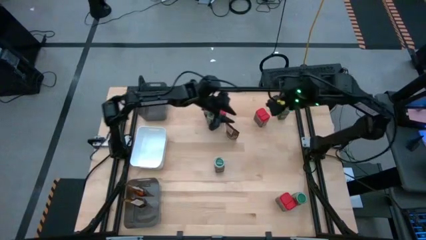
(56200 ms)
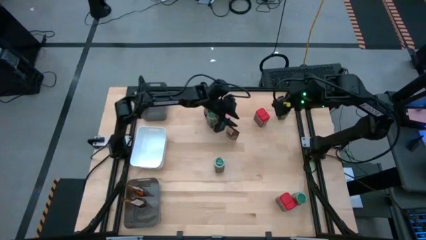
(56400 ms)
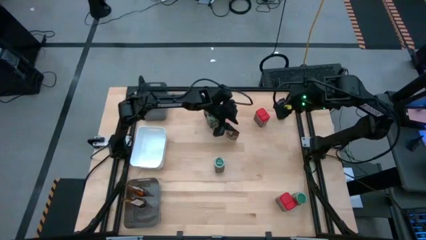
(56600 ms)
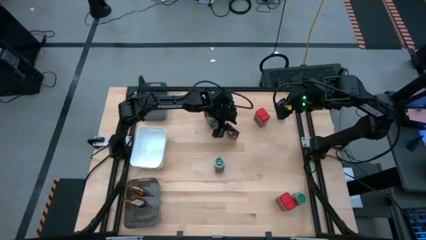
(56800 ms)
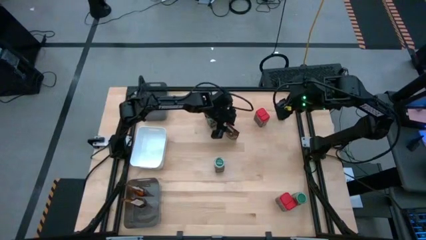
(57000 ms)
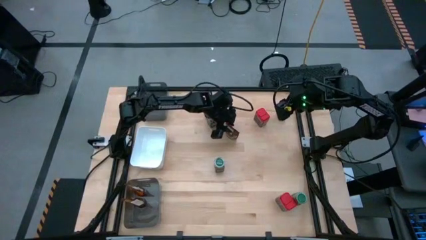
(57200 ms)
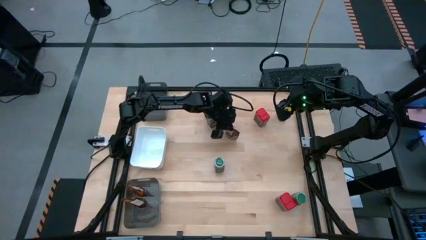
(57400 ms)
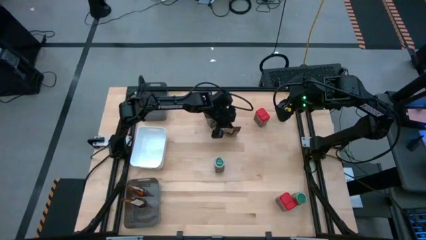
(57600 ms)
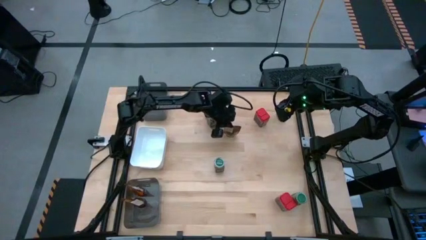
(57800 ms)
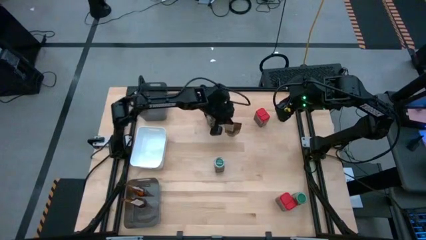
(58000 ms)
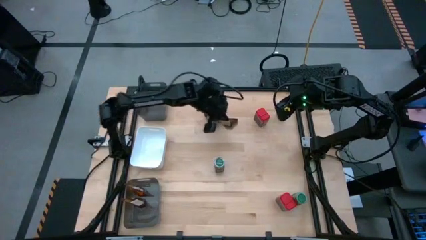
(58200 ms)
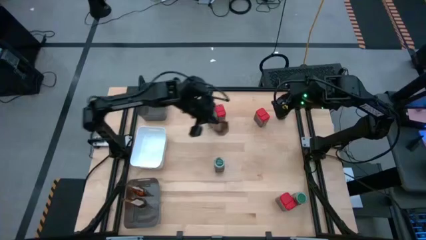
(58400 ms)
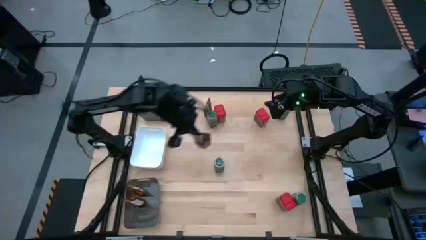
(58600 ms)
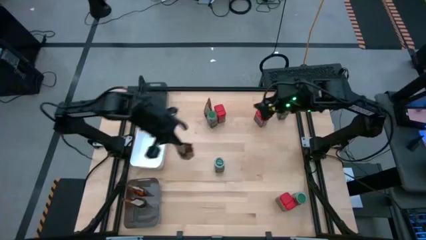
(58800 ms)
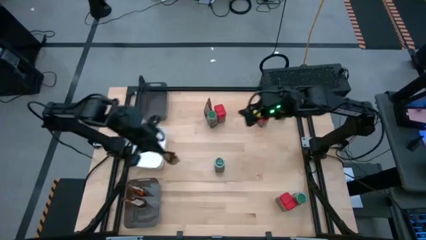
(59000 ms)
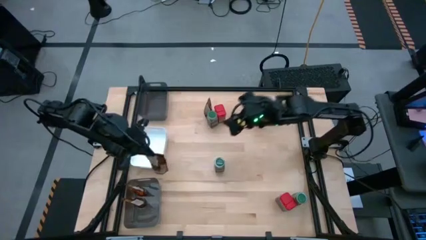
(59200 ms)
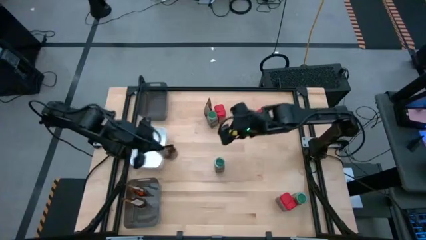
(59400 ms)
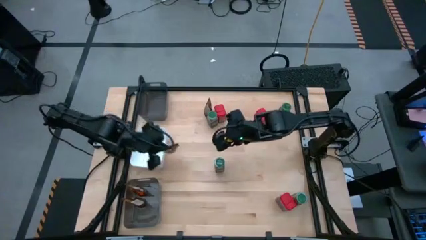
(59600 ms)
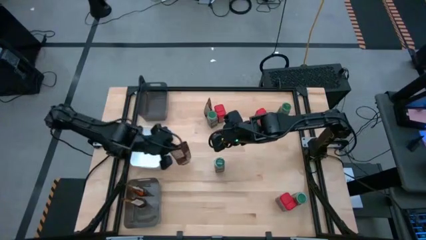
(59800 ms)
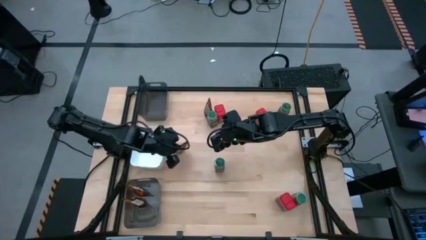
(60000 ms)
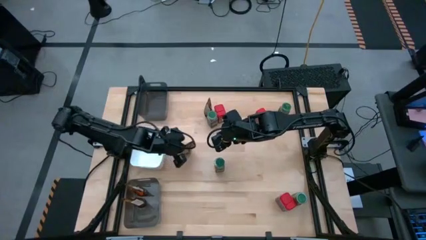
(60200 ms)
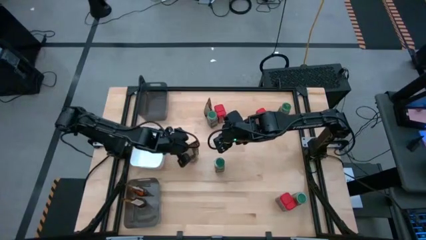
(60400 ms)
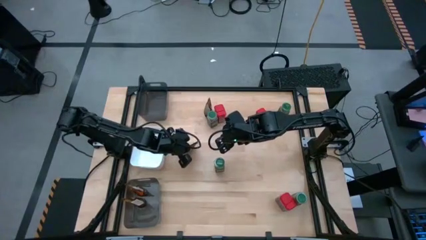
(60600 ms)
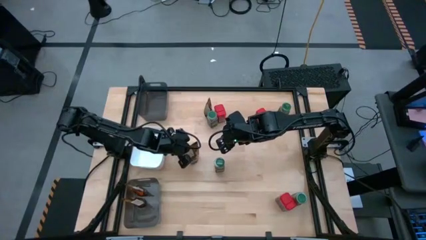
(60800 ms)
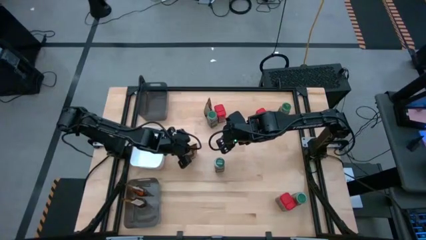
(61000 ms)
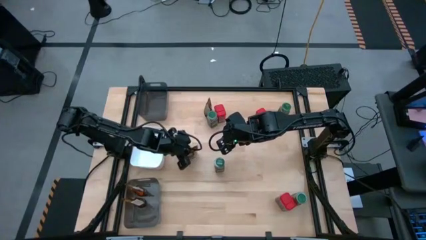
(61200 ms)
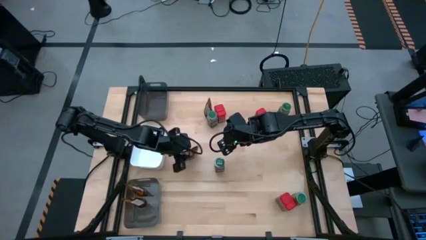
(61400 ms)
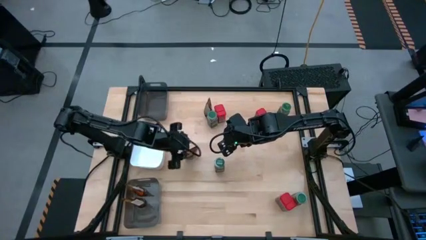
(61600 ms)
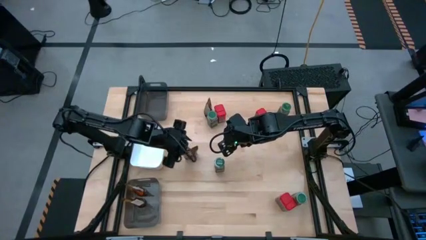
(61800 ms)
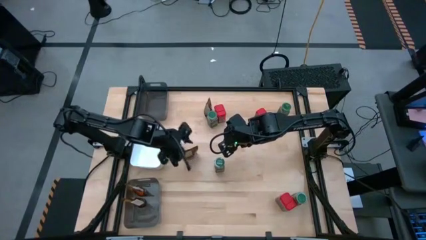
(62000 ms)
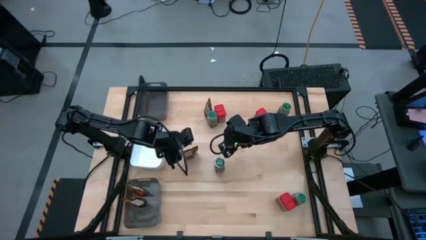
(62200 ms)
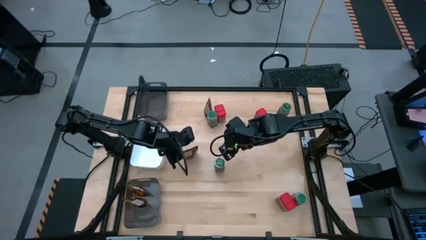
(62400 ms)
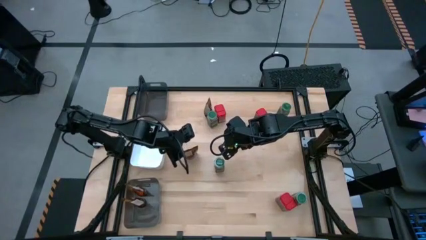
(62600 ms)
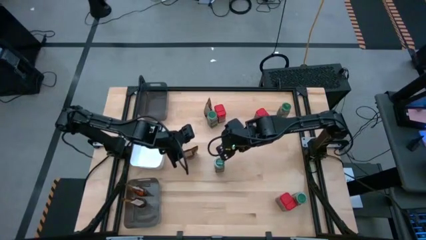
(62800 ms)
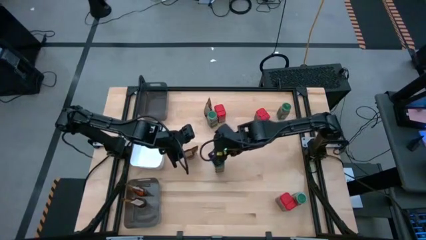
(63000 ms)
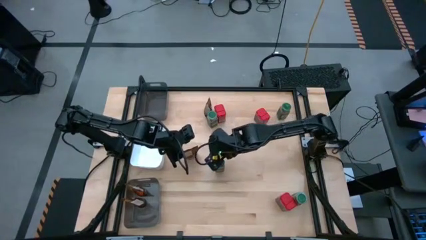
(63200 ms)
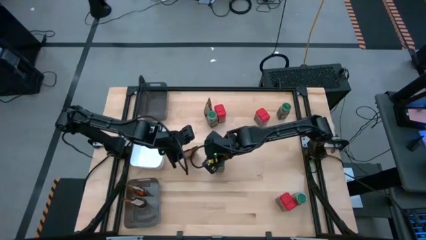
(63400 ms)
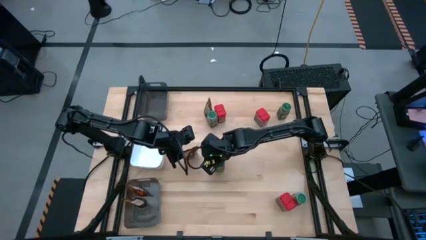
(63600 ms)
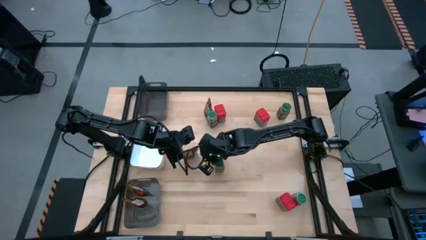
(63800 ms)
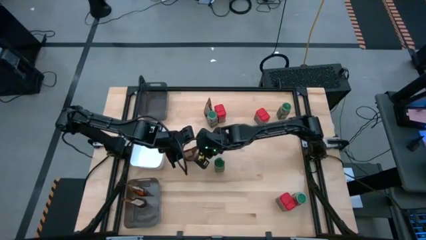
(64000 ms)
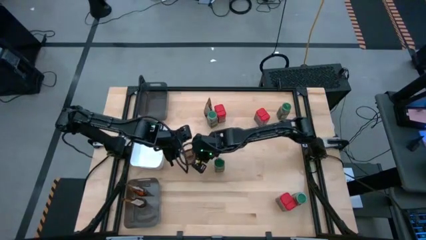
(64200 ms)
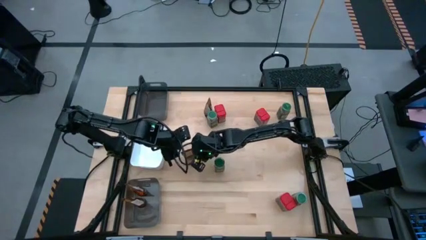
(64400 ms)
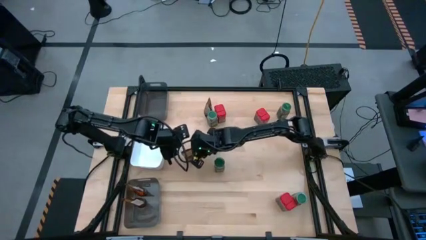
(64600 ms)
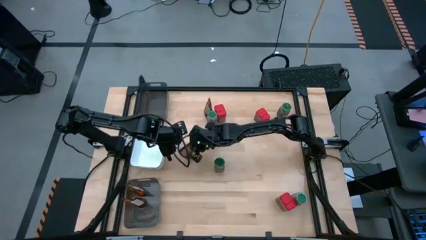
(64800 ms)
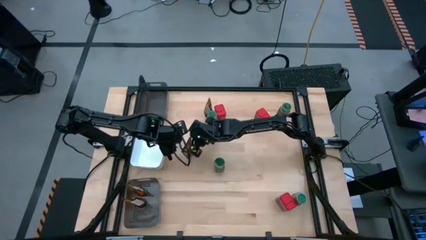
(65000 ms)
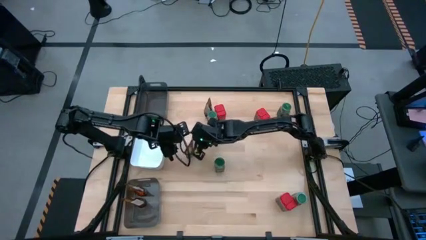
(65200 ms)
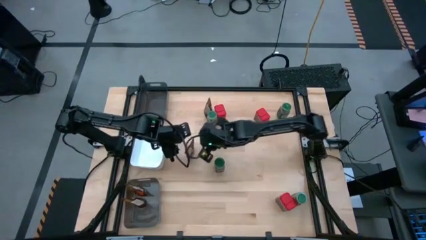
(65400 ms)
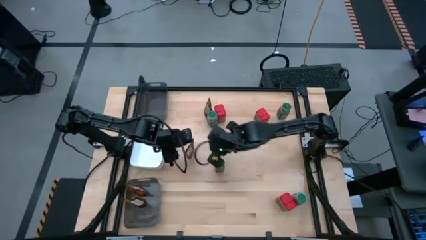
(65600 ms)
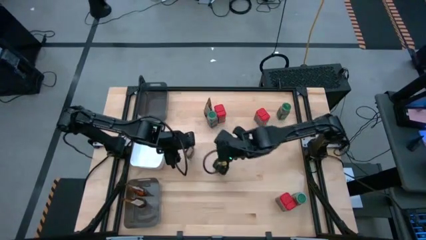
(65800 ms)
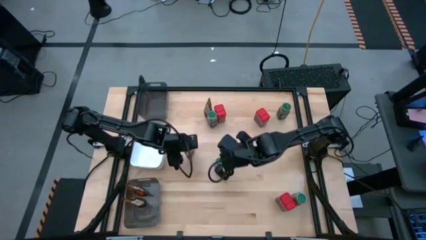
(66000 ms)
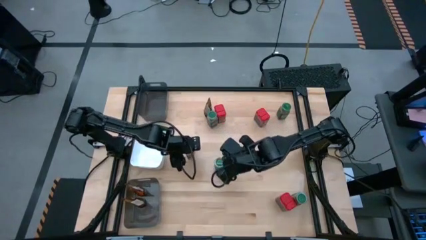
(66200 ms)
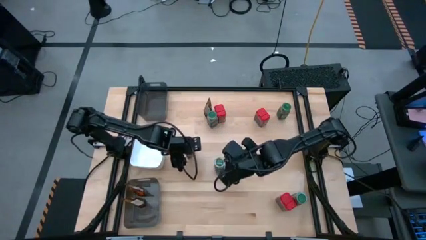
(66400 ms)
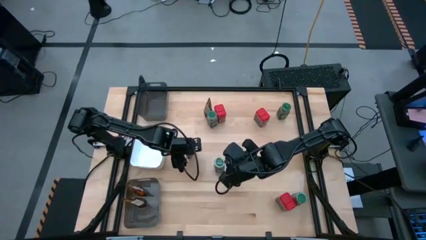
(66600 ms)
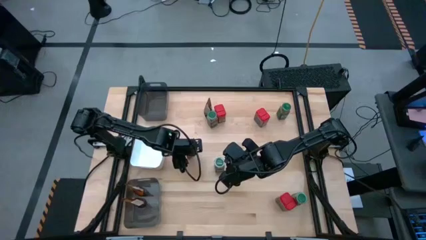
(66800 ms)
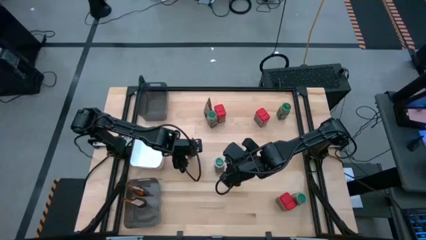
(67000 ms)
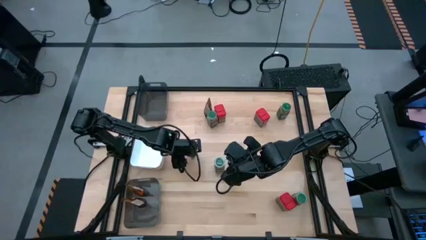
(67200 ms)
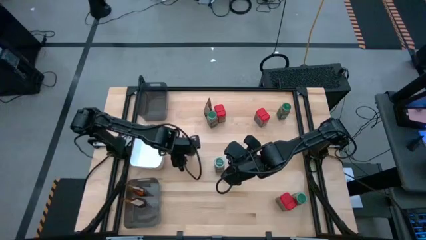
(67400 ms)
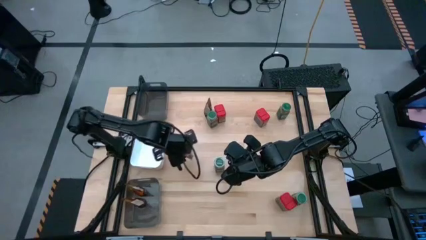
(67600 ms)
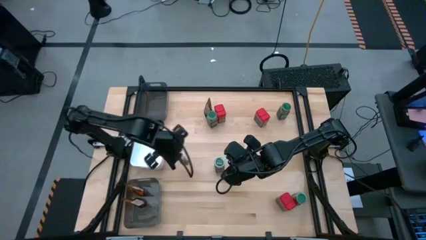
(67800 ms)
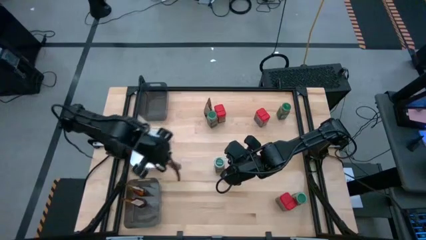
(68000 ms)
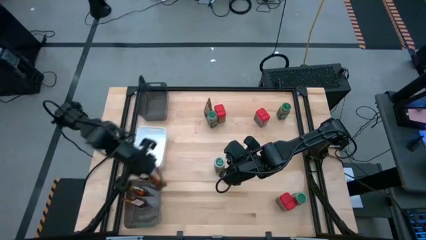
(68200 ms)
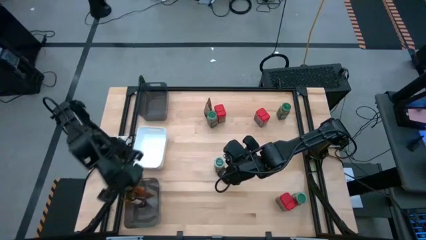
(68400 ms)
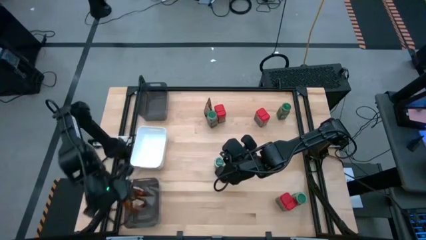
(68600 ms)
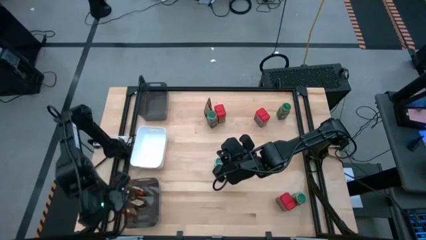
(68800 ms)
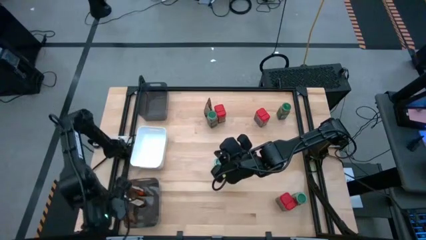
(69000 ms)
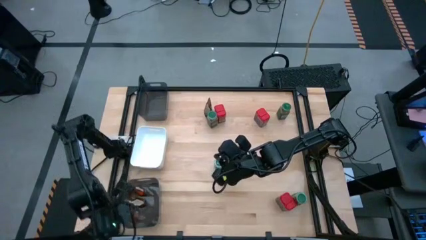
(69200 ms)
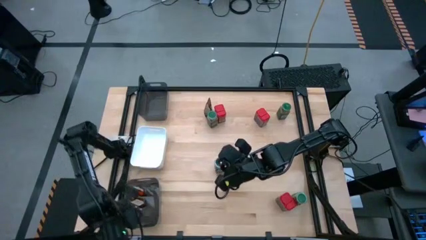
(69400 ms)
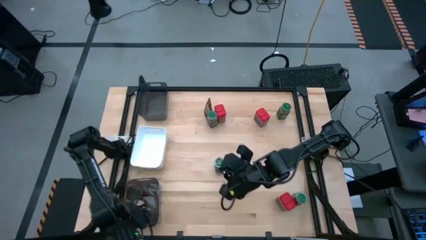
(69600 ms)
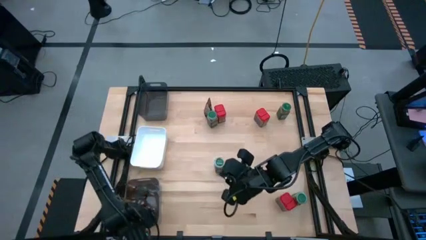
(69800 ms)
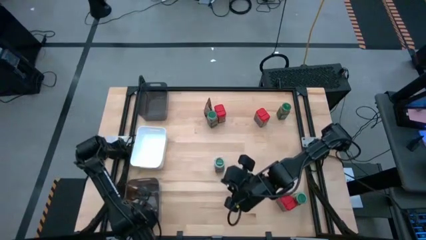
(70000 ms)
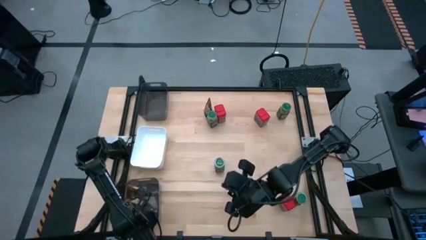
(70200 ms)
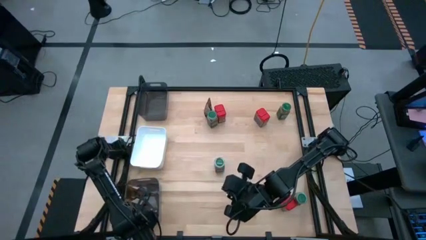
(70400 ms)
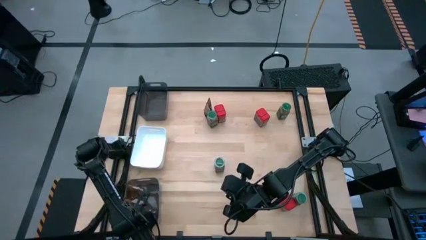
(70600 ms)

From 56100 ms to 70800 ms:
Task: Sort spices by type
Put the orange seasoning bag into the bottom black bin

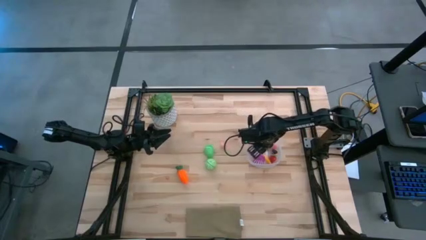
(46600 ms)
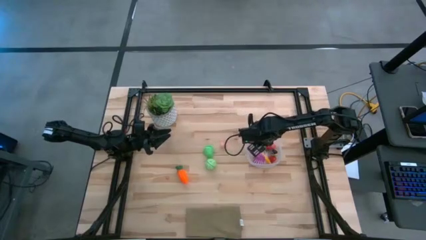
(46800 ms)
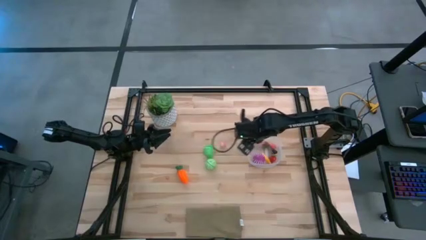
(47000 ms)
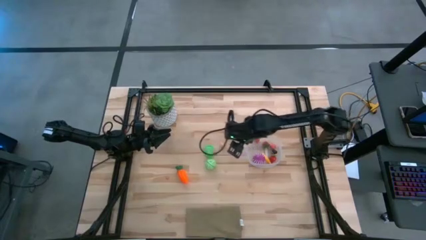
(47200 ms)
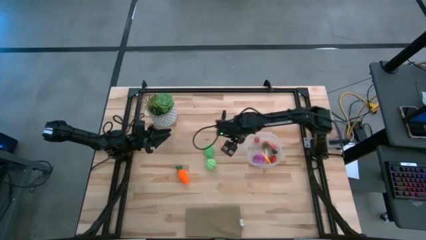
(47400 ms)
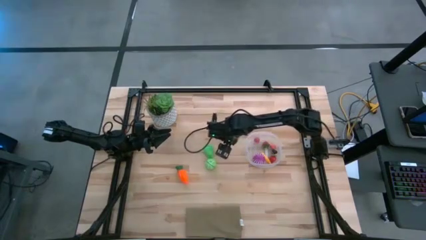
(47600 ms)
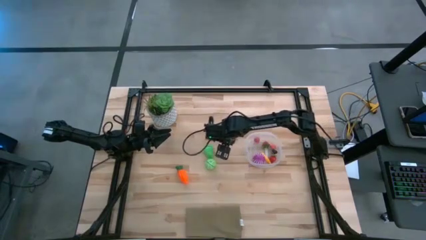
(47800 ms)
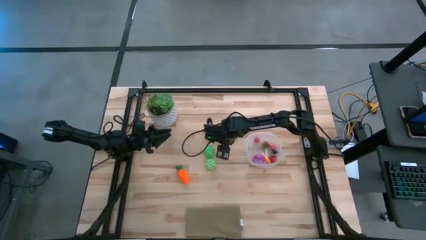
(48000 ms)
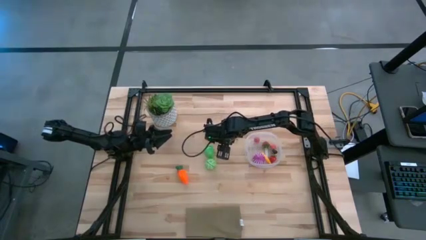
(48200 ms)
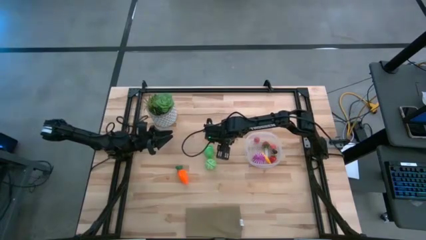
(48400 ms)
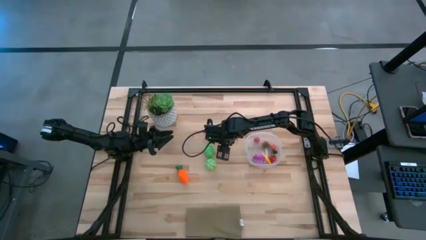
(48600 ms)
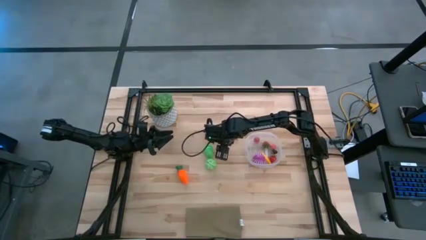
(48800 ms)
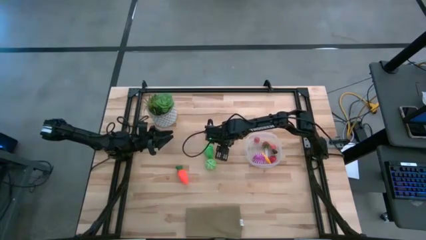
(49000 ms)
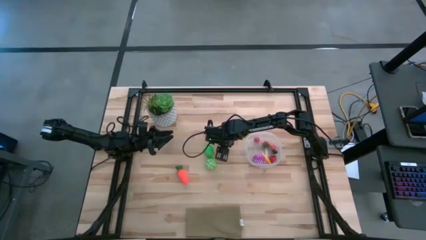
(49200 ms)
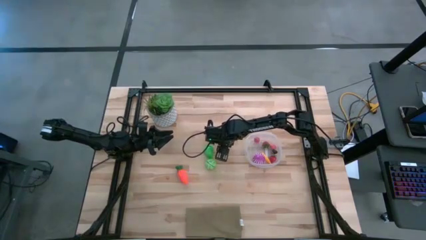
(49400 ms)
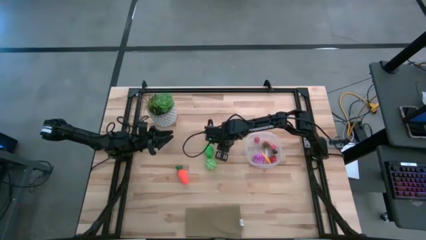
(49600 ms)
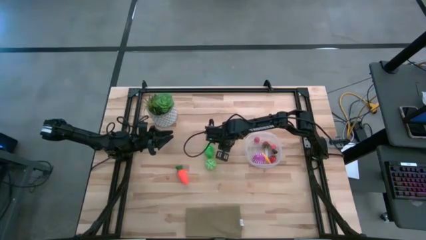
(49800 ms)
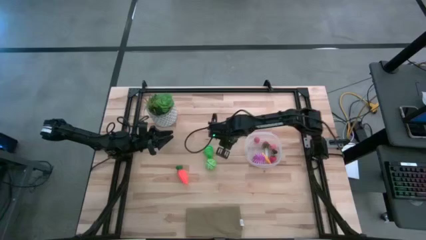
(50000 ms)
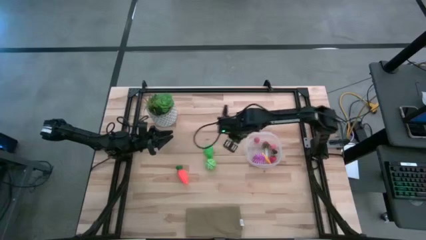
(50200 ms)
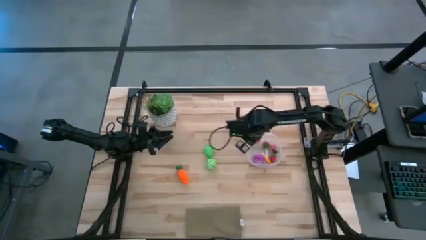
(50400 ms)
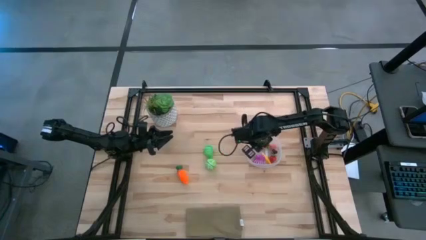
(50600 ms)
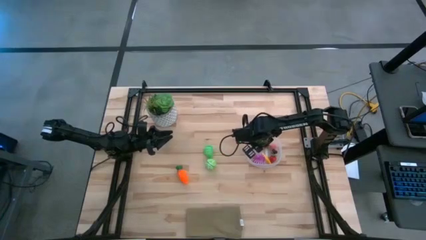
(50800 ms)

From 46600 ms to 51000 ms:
Task: Pick and placing Produce into tupperware
Put the pink peach into the transparent container
